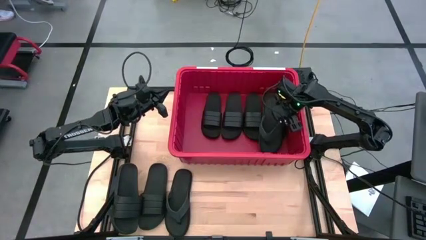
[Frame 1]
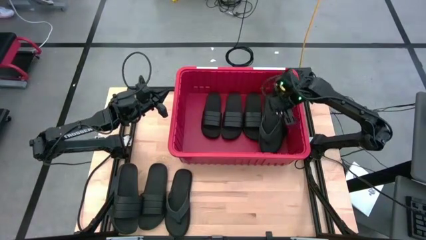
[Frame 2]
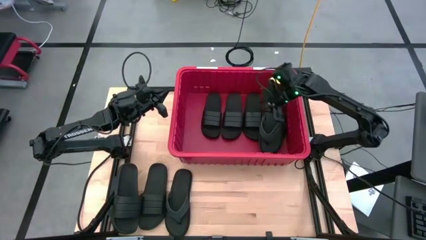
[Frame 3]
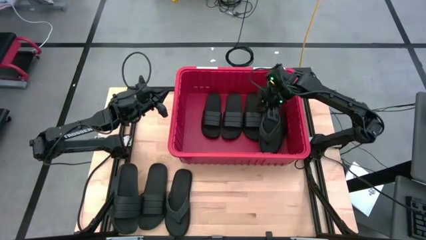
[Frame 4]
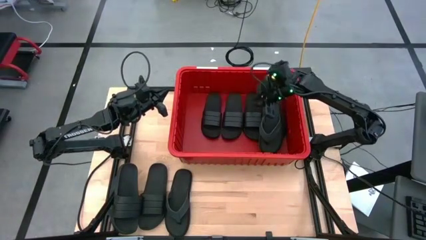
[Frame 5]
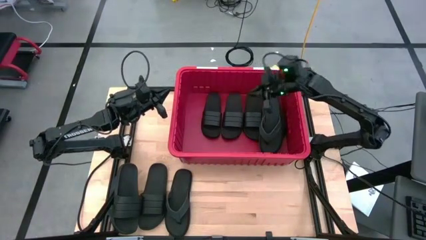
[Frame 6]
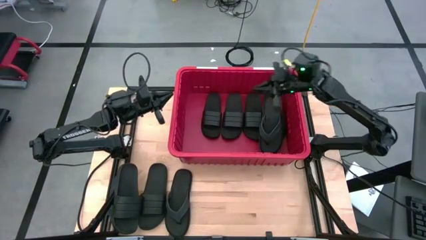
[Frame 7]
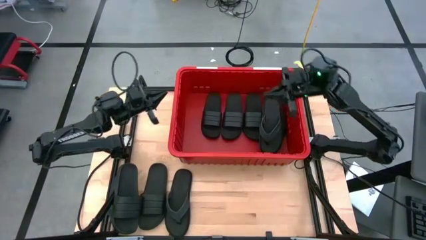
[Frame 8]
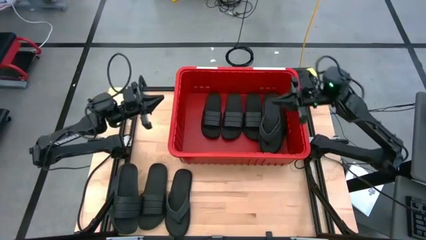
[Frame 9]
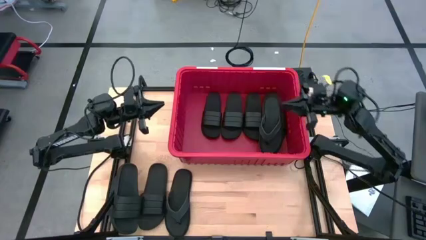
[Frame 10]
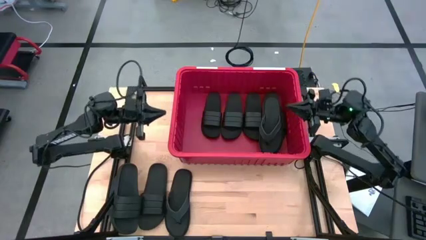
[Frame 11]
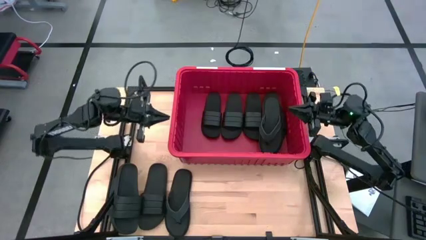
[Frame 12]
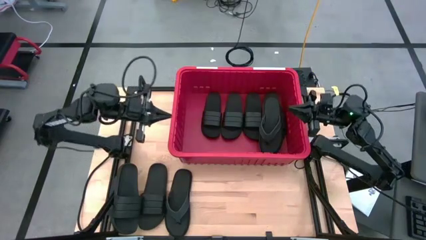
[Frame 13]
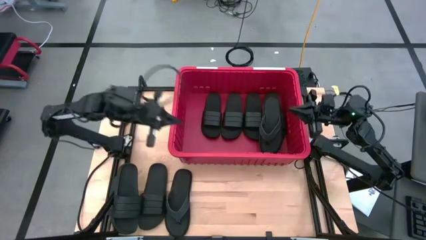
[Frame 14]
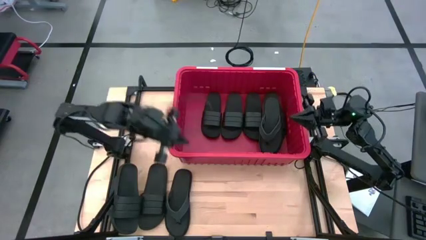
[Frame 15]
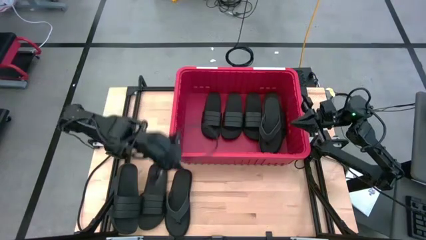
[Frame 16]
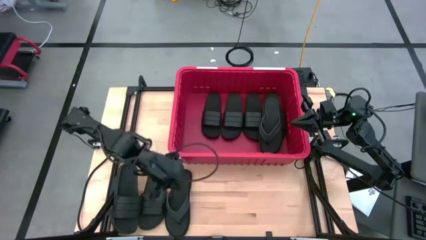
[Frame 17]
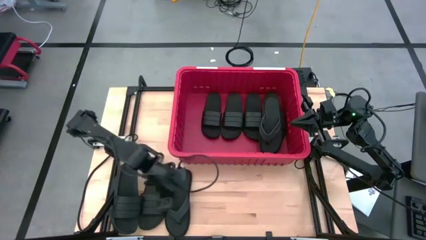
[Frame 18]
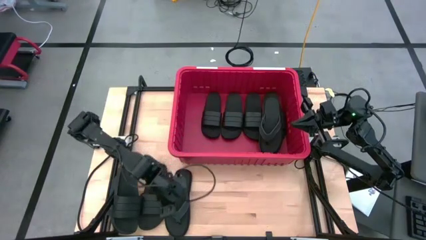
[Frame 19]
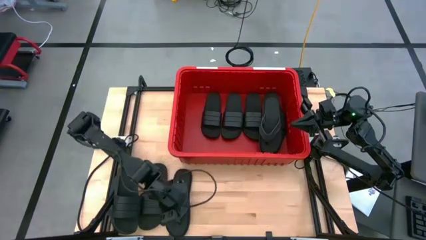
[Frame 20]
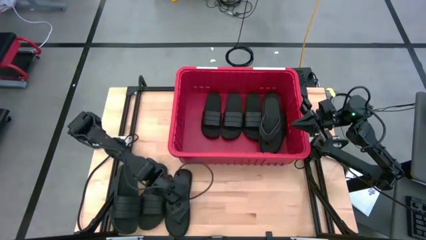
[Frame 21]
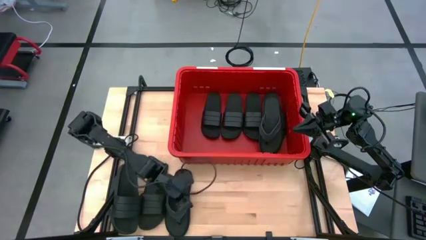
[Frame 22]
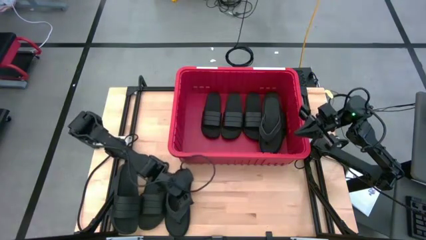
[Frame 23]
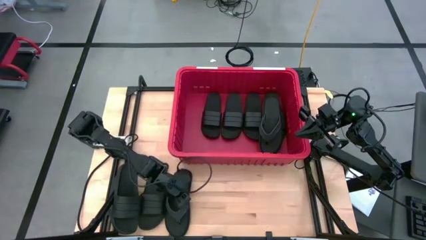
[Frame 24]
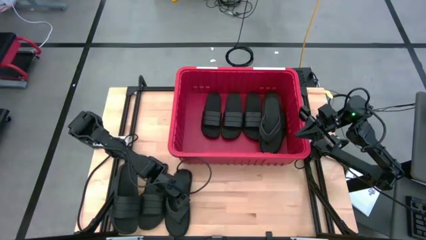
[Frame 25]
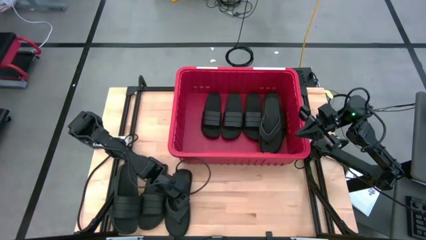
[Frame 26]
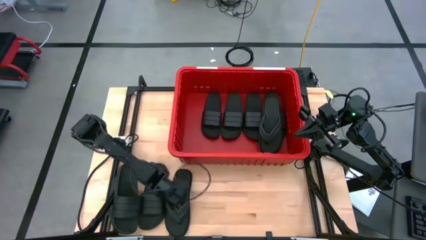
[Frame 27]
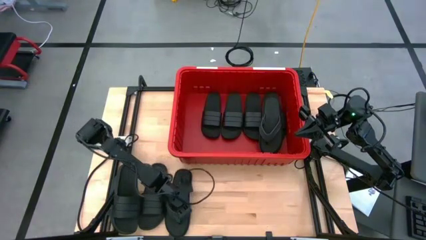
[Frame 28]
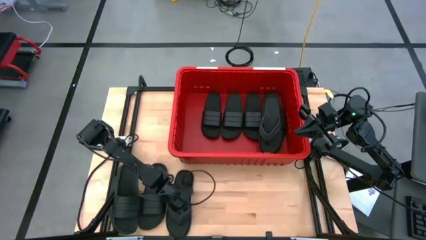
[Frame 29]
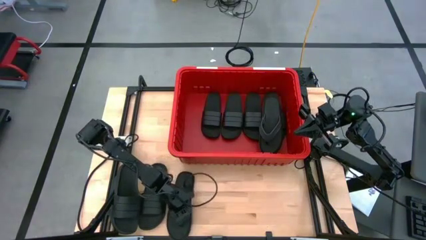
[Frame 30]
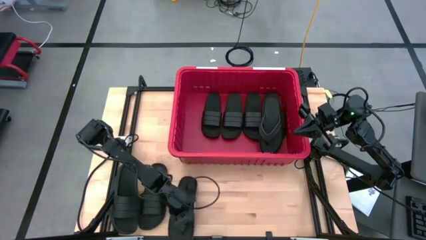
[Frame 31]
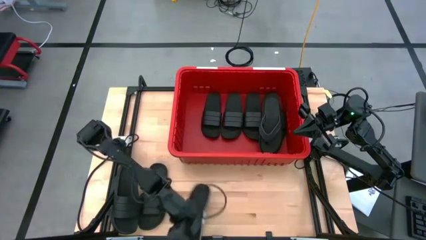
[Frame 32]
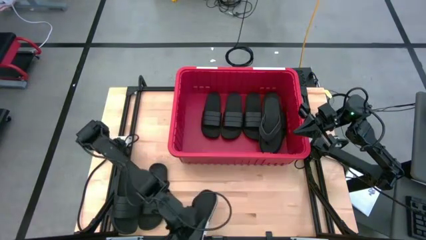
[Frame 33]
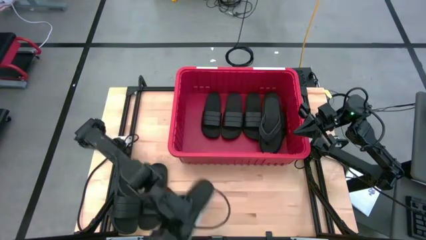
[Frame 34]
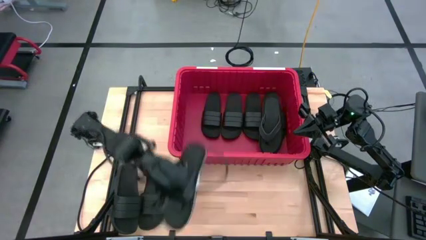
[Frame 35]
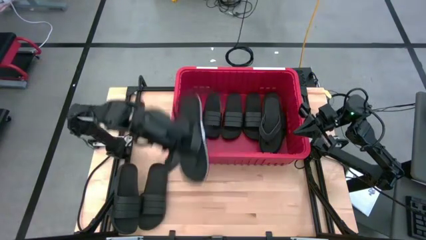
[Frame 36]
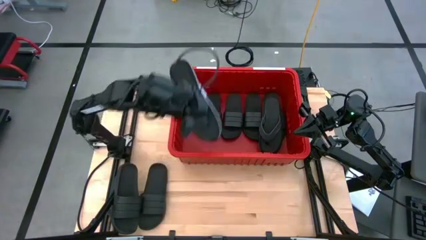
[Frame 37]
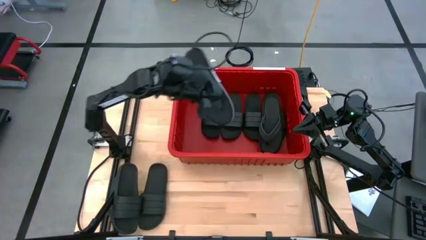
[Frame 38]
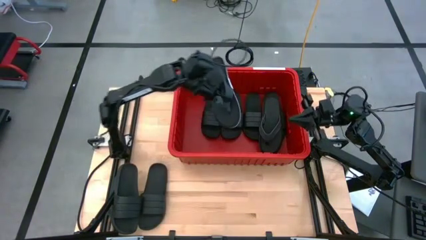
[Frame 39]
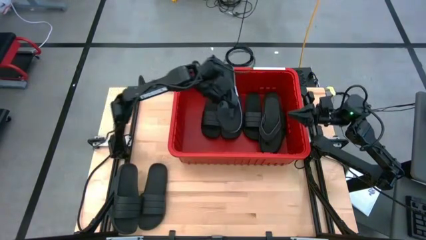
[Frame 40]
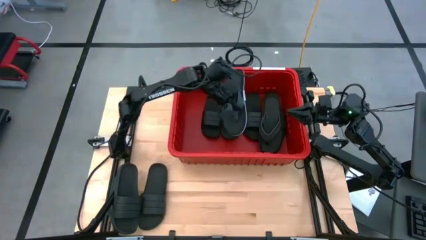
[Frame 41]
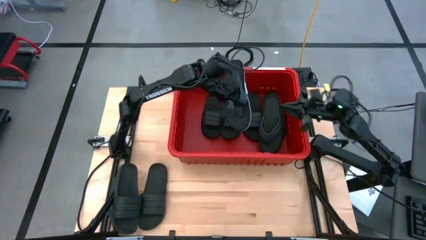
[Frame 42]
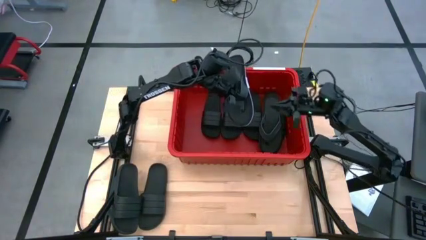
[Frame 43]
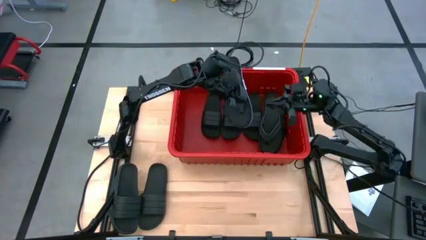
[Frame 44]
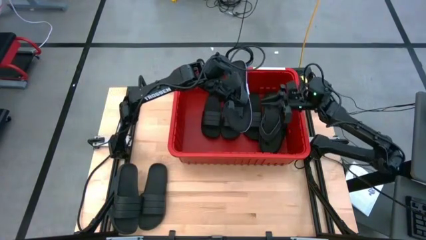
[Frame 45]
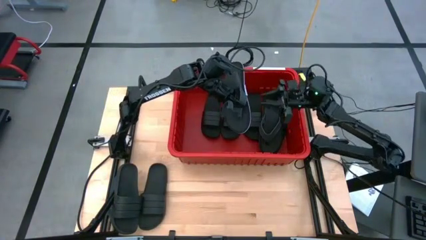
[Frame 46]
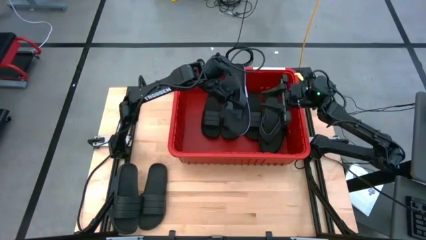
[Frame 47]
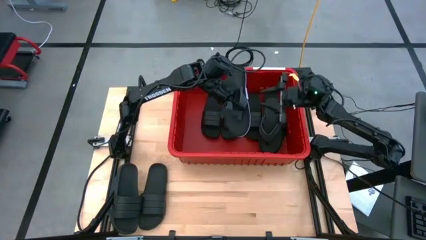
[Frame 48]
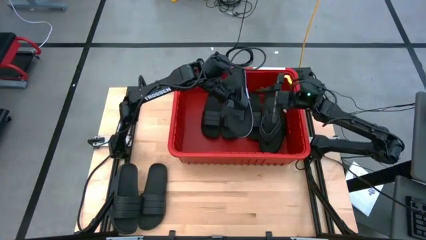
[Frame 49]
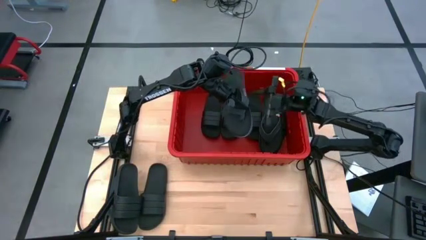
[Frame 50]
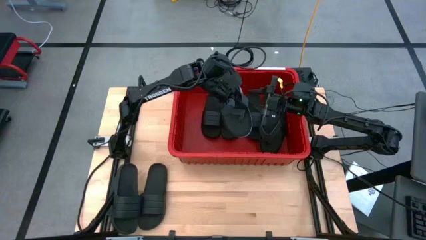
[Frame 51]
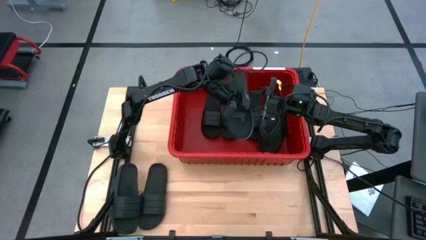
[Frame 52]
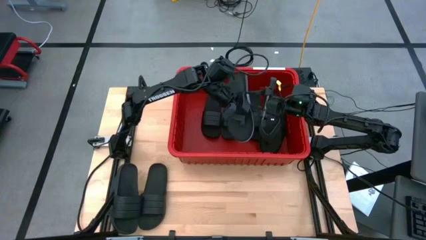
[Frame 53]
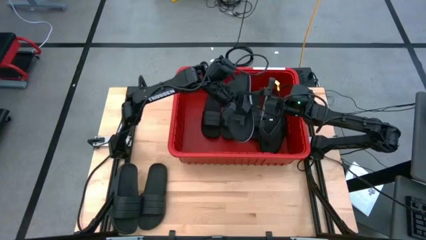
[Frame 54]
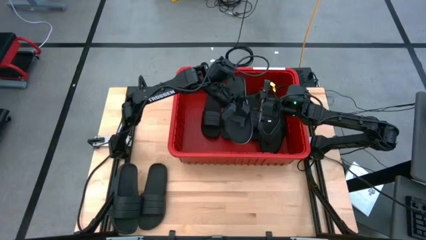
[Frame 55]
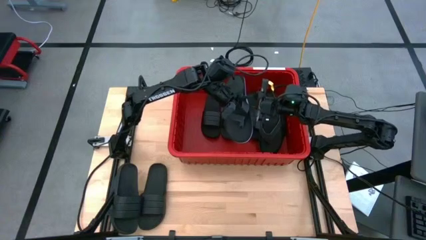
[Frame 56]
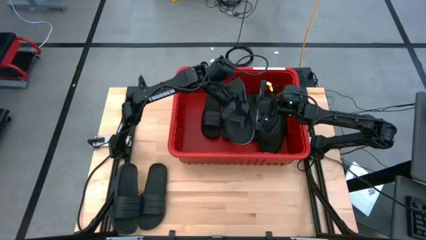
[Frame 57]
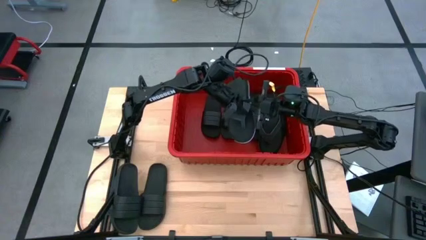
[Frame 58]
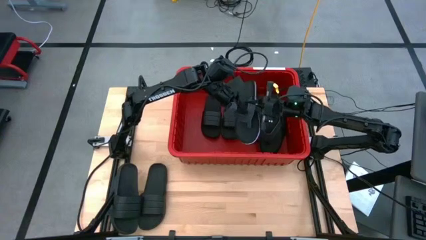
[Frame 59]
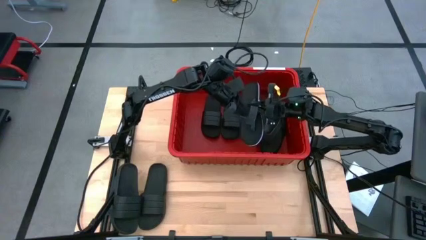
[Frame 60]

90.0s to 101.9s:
Task: Pick and place slides into bin
Put the flip flop into the bin

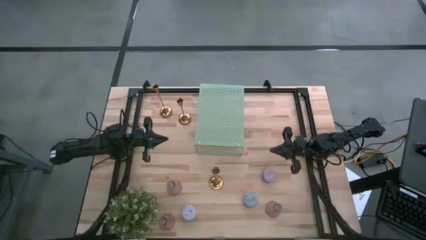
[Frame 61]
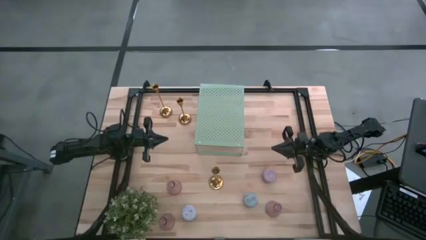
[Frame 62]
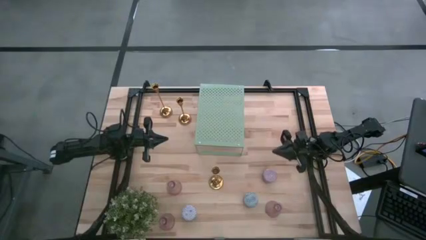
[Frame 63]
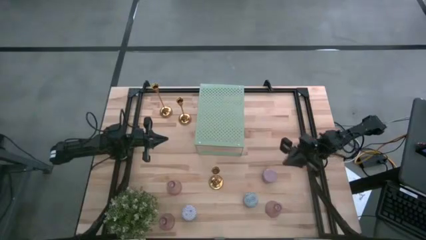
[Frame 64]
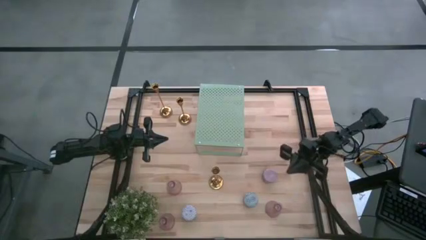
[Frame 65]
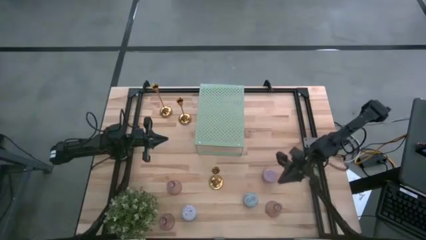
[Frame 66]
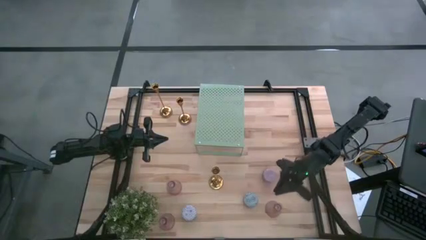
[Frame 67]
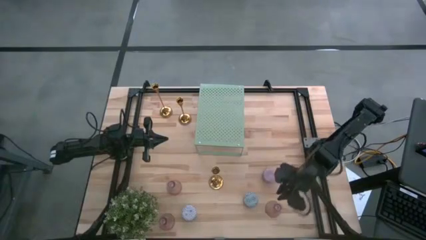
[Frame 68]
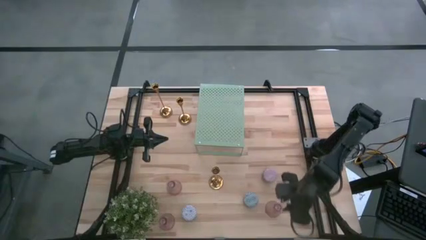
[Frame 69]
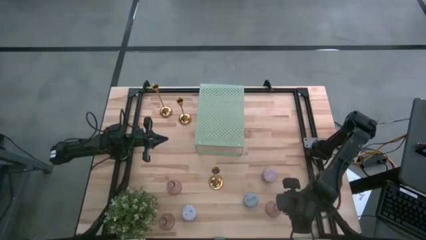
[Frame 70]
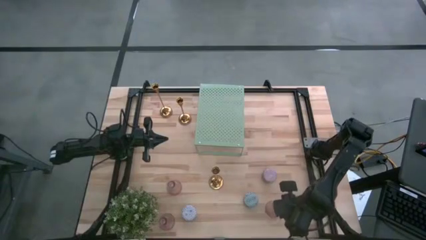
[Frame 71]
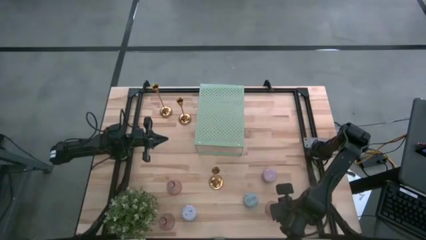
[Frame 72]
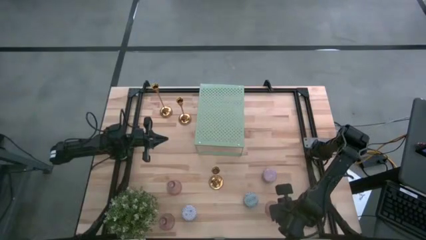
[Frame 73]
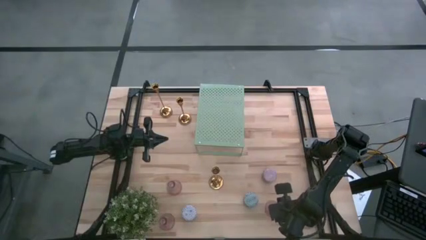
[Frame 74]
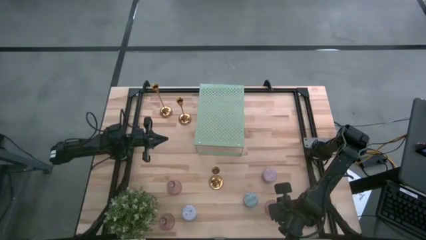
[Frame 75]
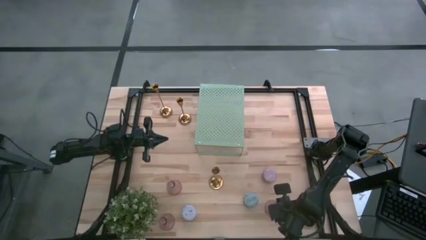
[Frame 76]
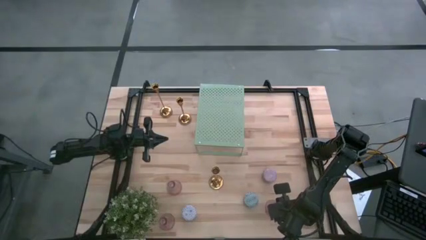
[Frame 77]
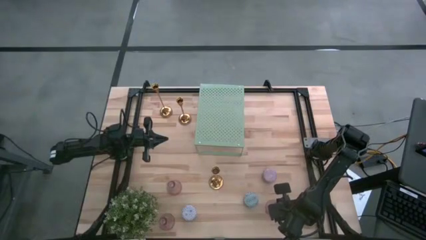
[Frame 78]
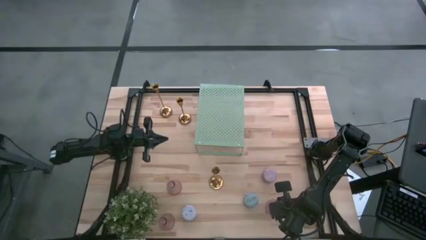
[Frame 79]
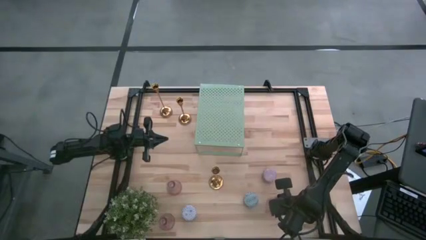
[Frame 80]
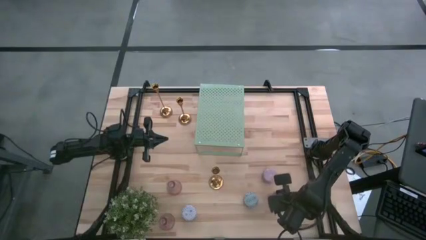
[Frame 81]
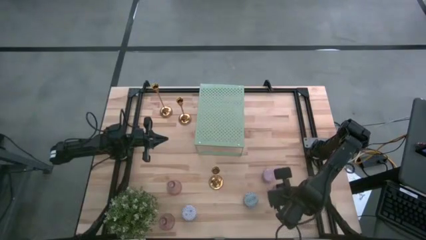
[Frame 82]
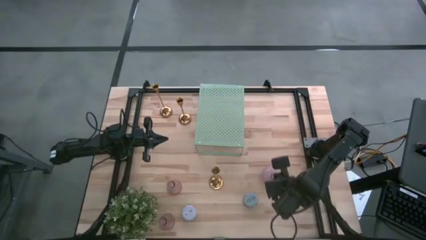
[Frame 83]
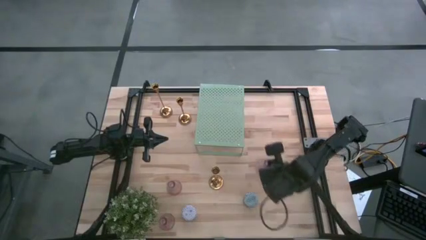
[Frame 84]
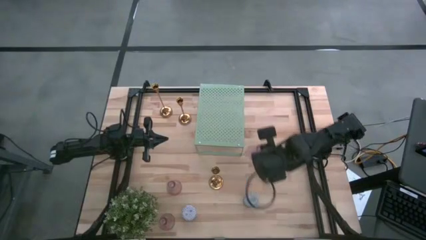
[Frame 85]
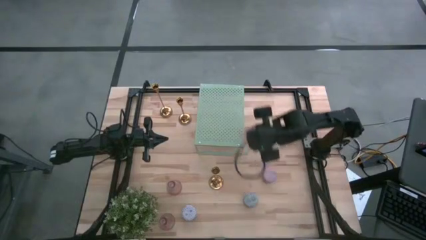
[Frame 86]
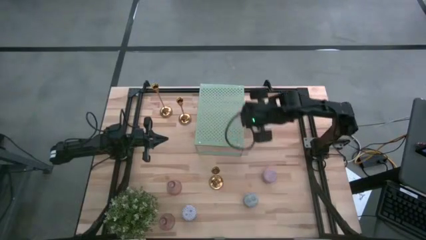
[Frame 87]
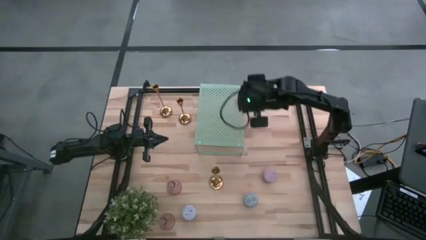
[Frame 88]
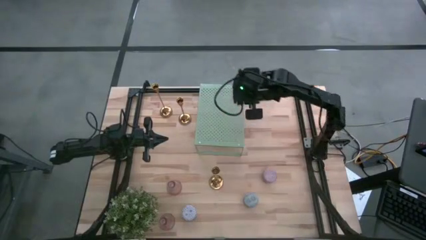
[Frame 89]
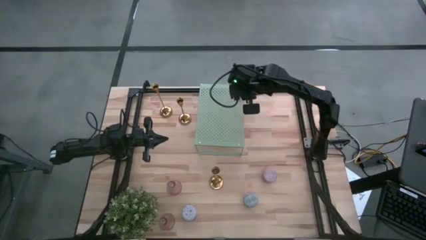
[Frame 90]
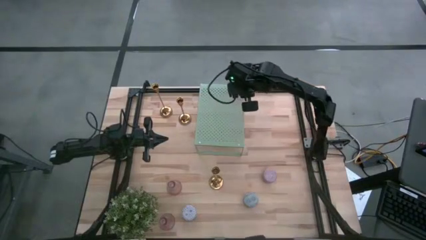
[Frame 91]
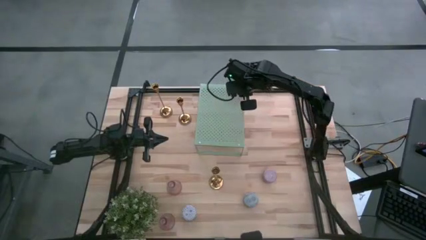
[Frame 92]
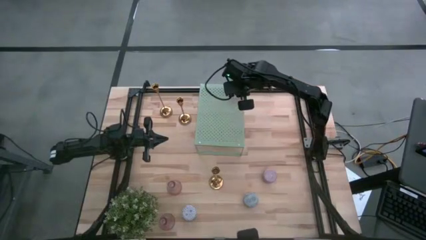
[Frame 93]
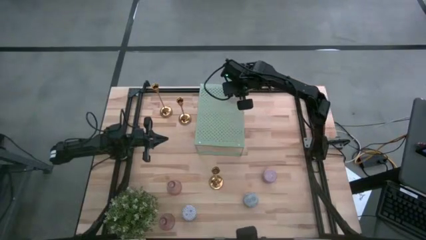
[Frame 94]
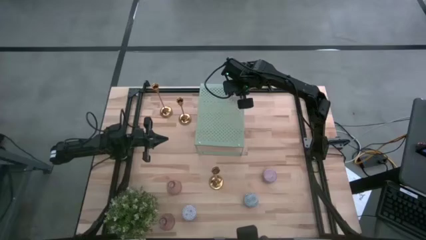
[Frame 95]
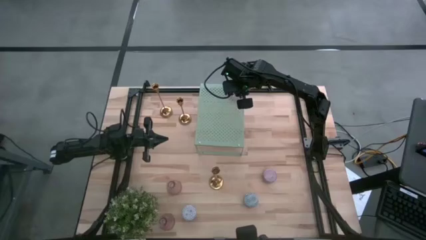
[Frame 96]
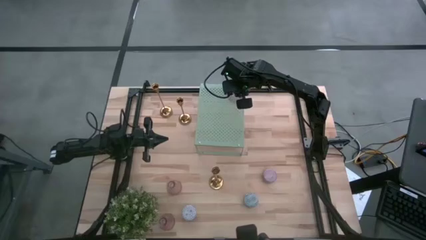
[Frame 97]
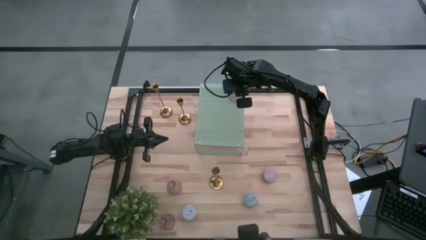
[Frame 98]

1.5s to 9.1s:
Task: Pick & Place candle stick holders
Put the bottom-right pink glass candle holder on the shelf
